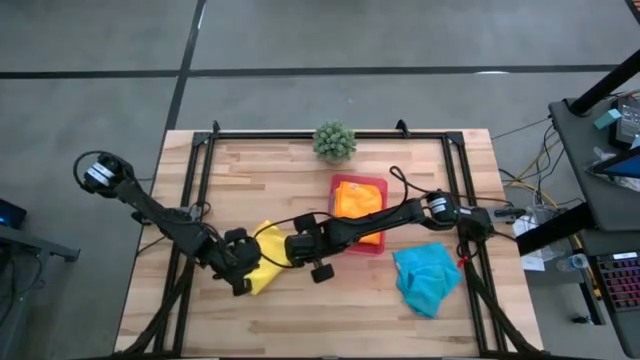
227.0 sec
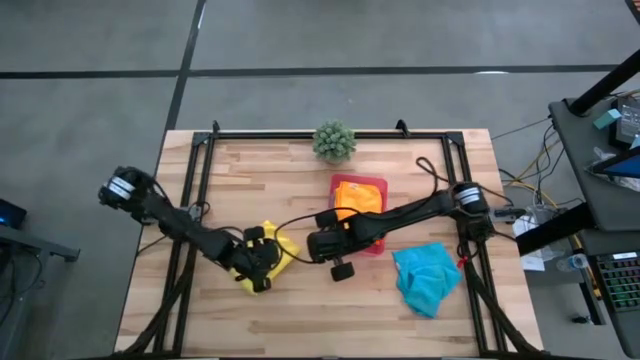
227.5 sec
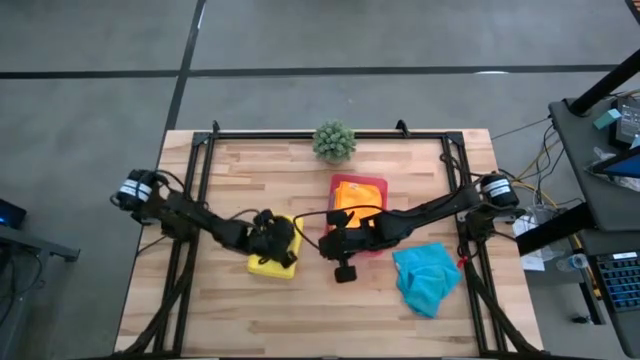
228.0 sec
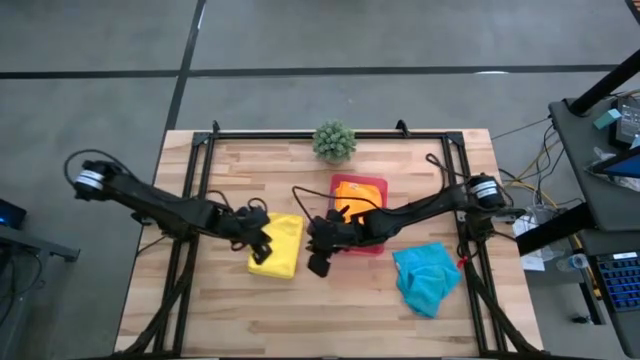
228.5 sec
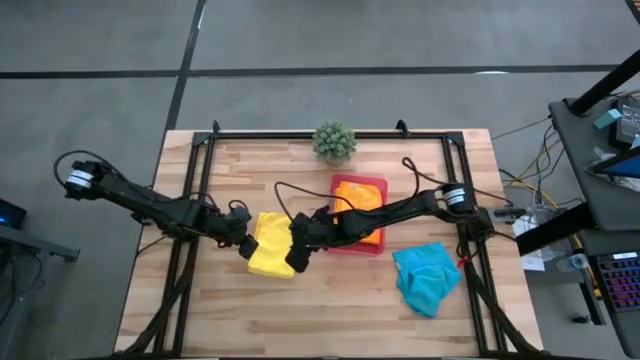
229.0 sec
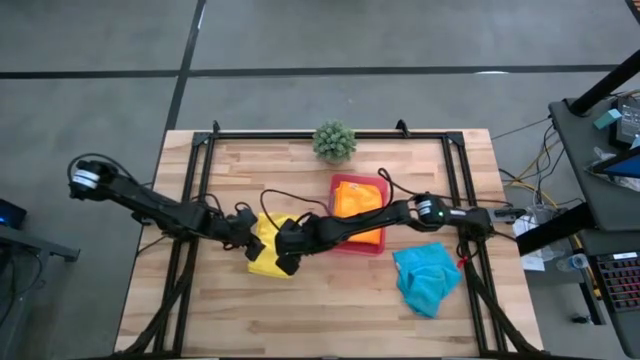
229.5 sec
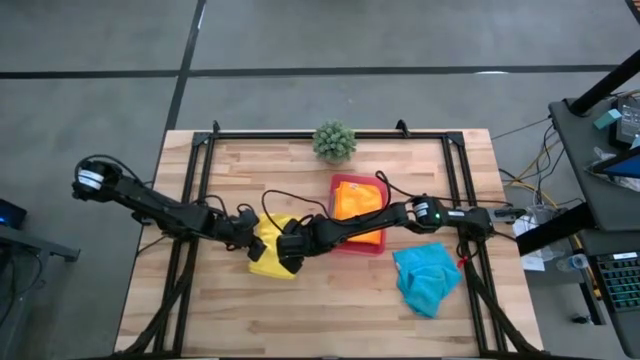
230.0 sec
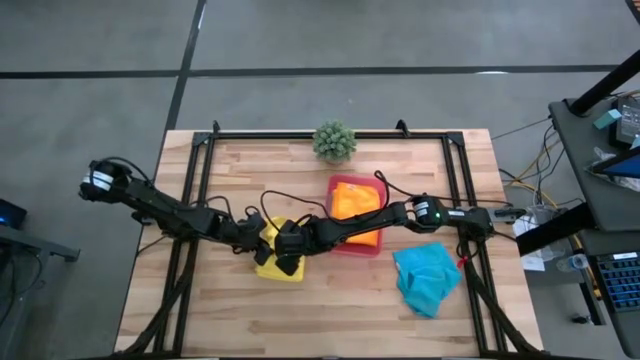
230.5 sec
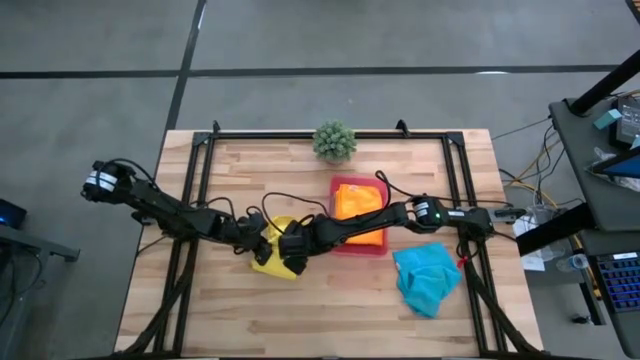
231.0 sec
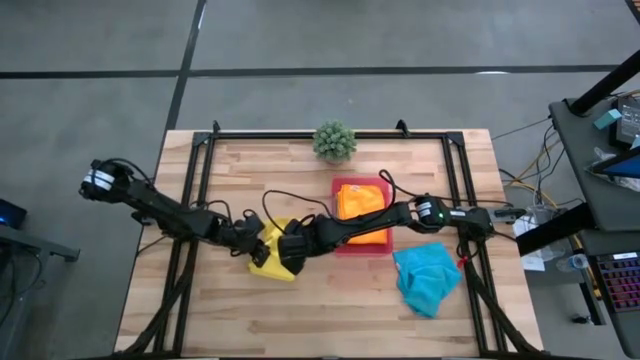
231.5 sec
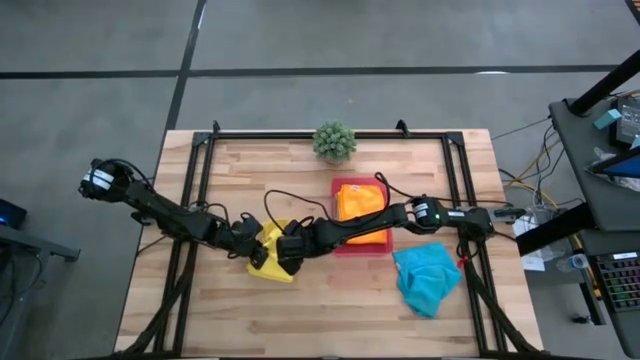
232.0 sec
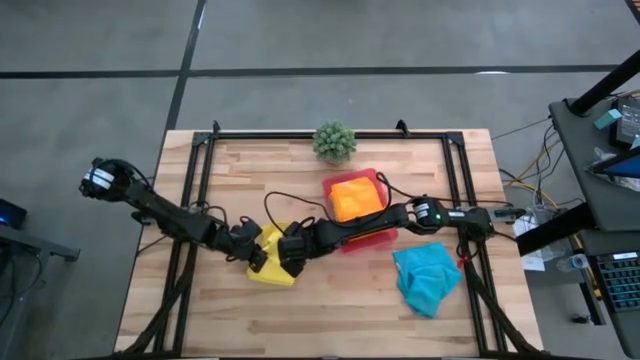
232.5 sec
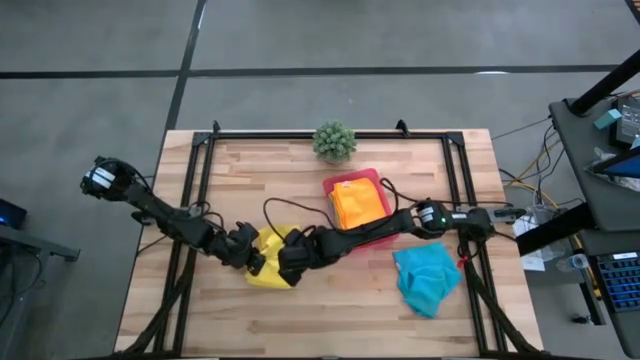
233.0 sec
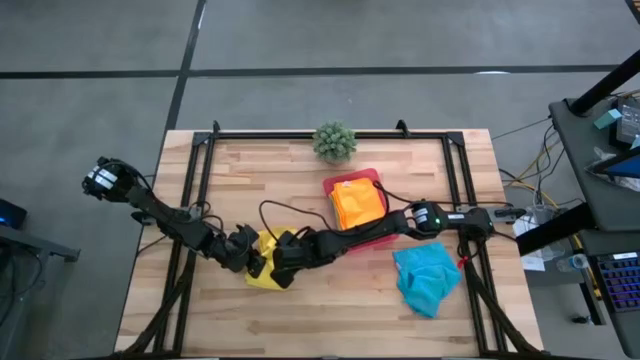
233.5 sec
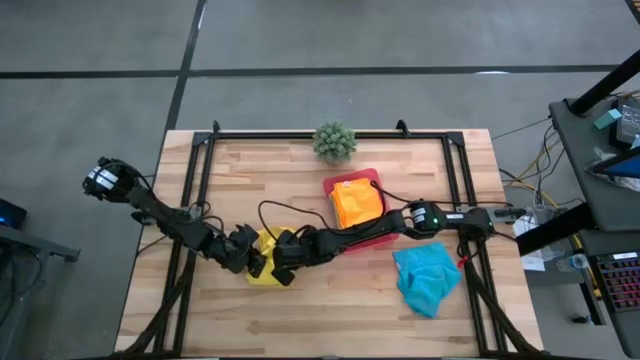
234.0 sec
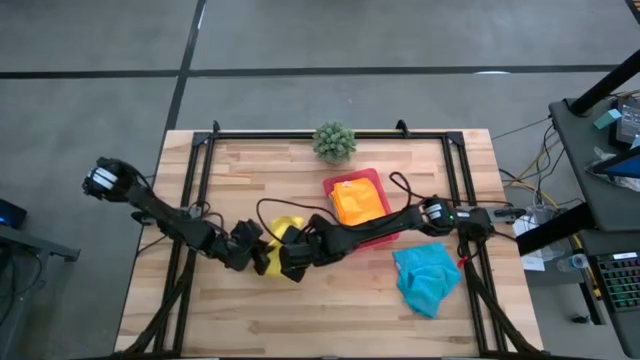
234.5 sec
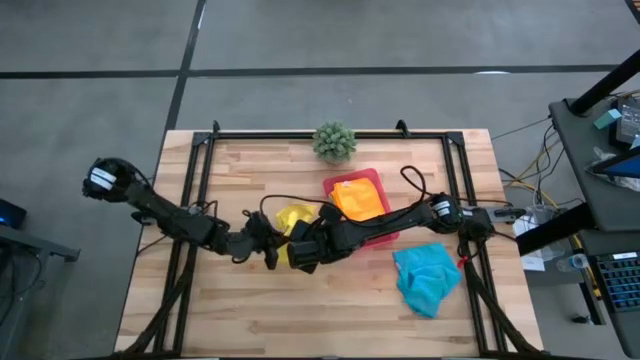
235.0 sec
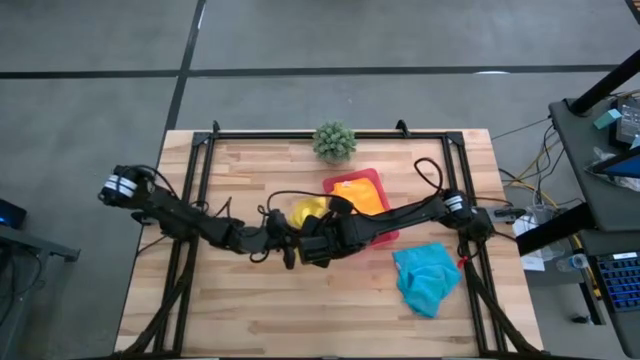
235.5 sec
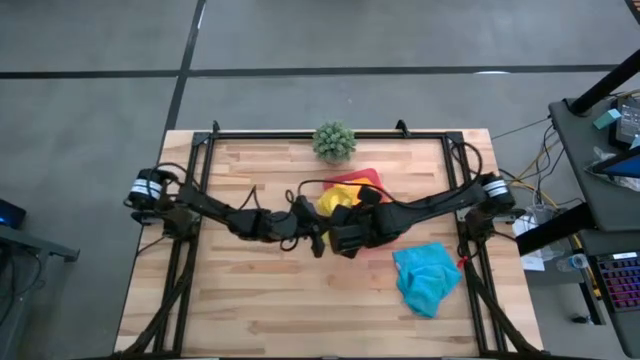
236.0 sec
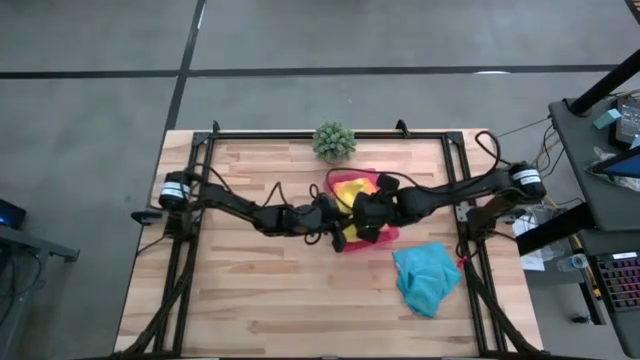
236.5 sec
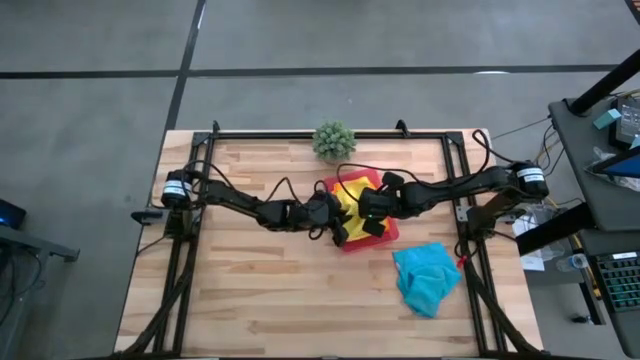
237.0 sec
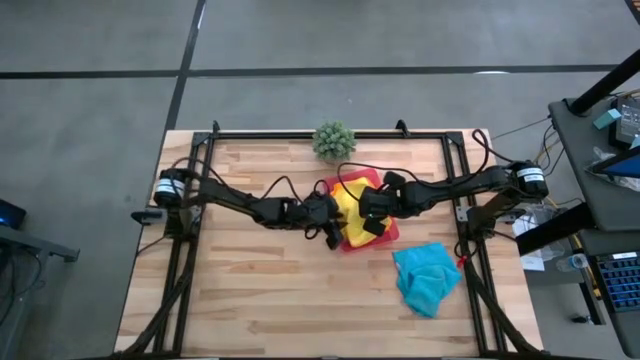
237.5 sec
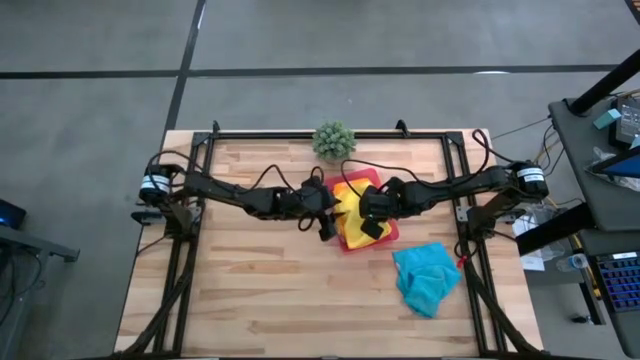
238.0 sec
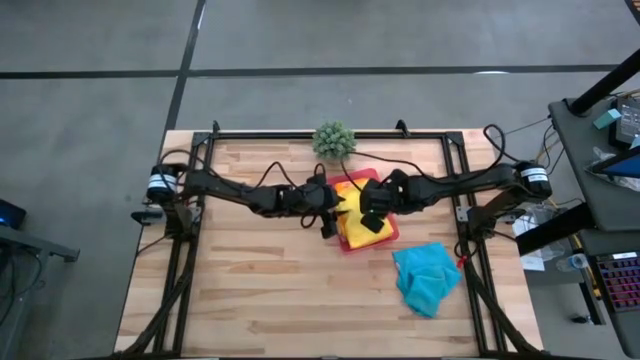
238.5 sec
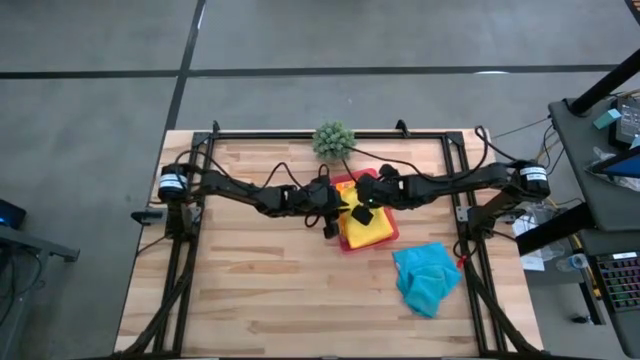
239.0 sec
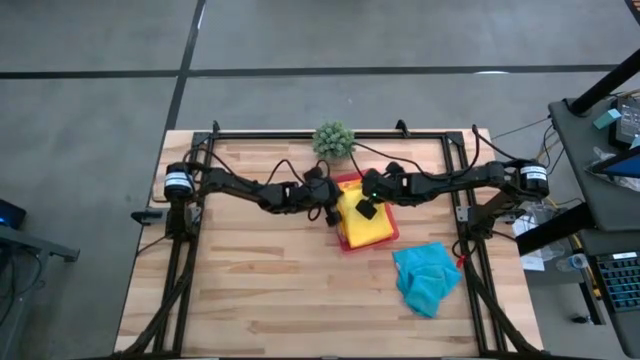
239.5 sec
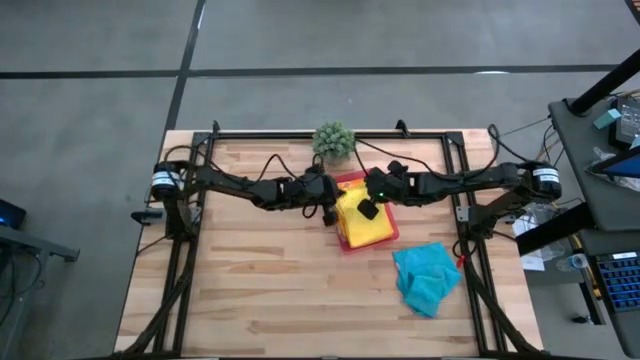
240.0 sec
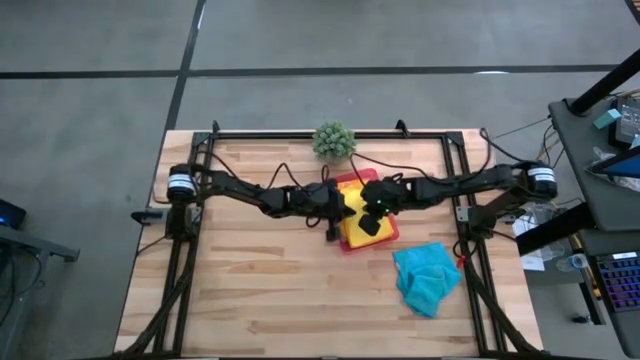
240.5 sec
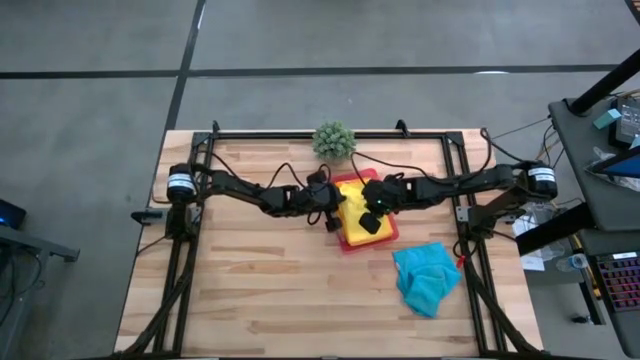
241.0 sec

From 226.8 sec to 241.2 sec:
Task: Fold microfiber towels
Put the yellow towel into the red bin

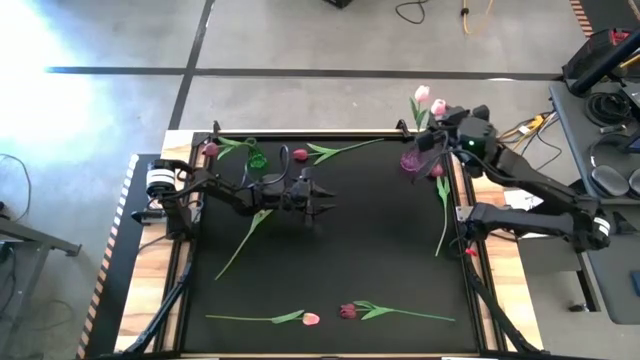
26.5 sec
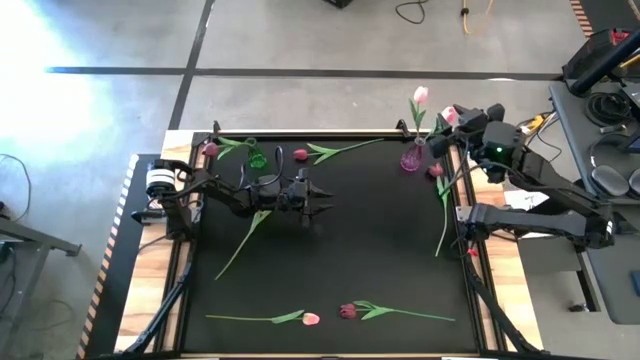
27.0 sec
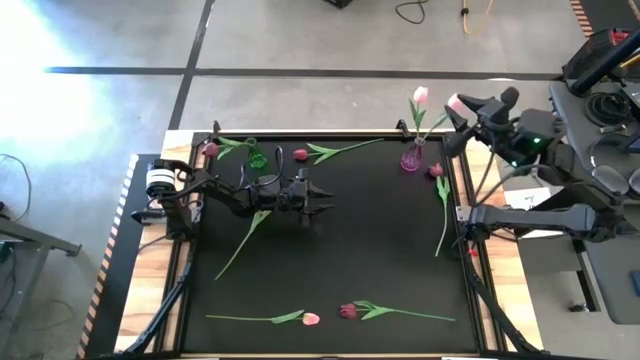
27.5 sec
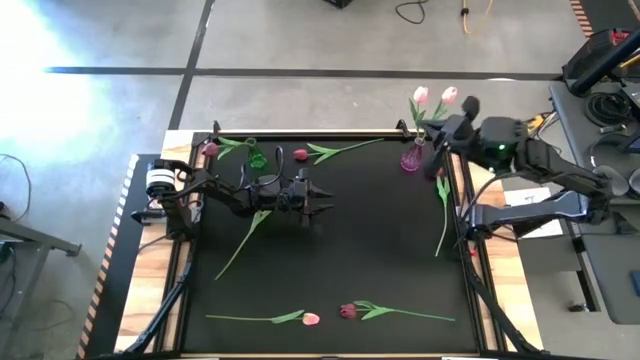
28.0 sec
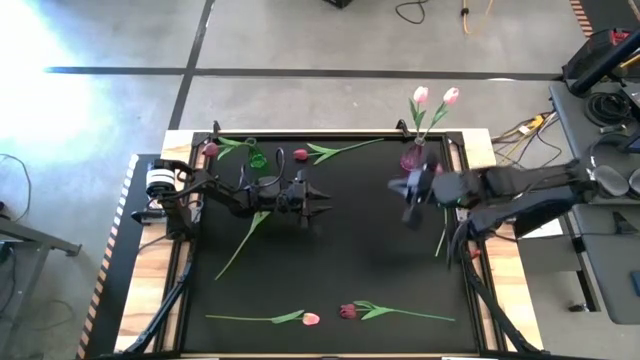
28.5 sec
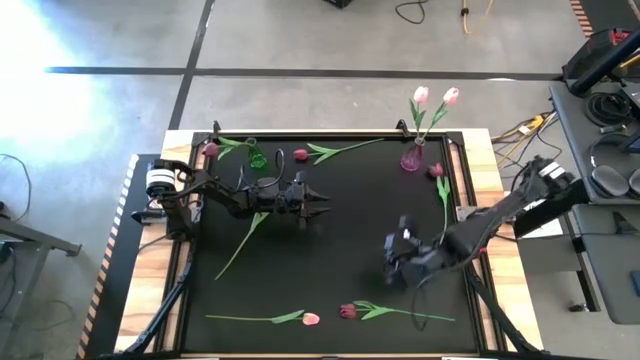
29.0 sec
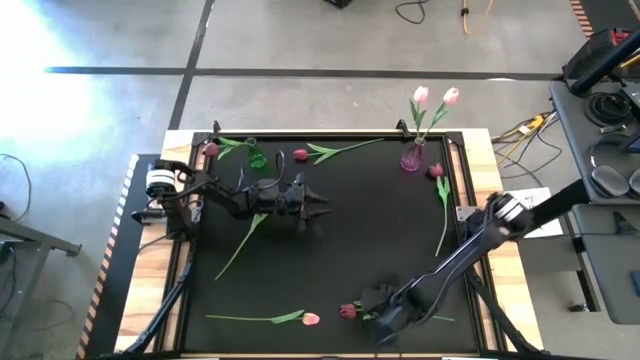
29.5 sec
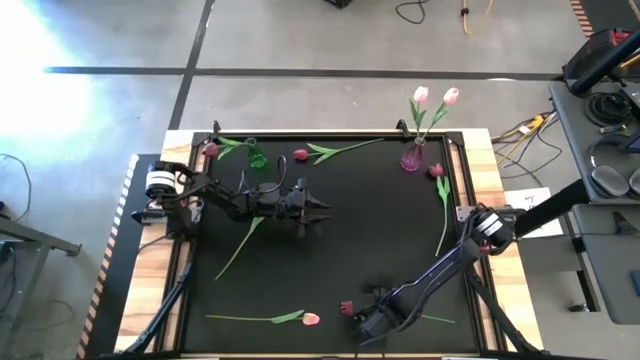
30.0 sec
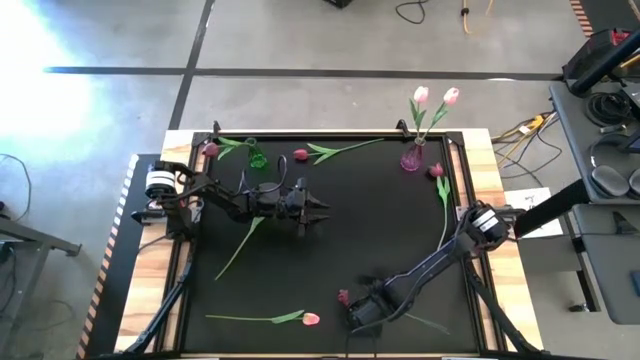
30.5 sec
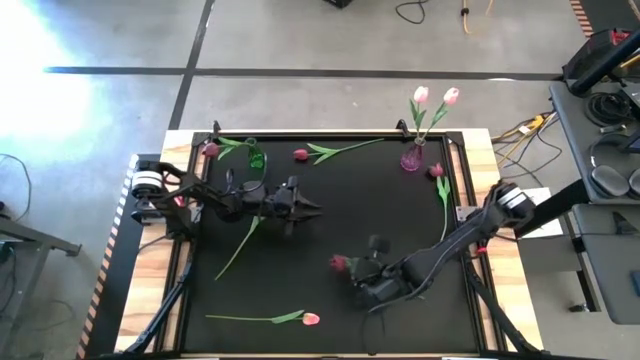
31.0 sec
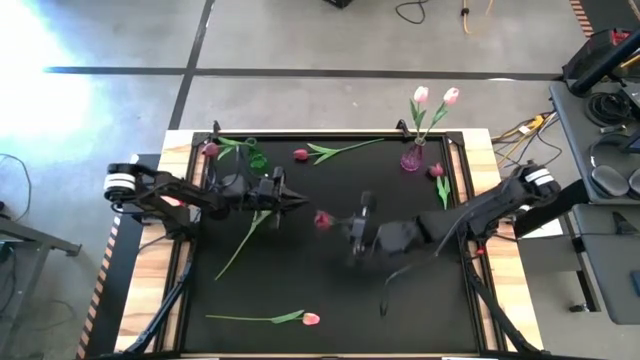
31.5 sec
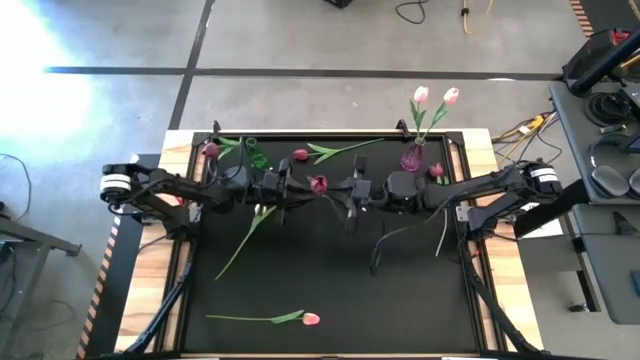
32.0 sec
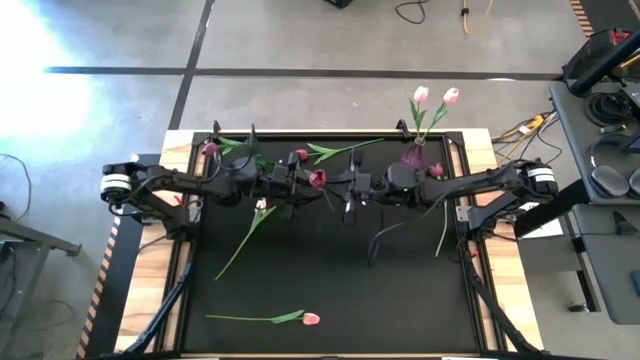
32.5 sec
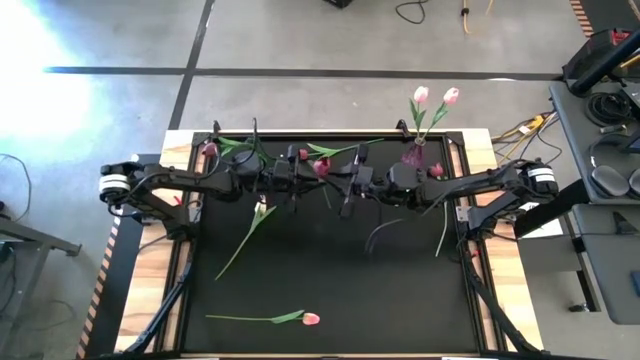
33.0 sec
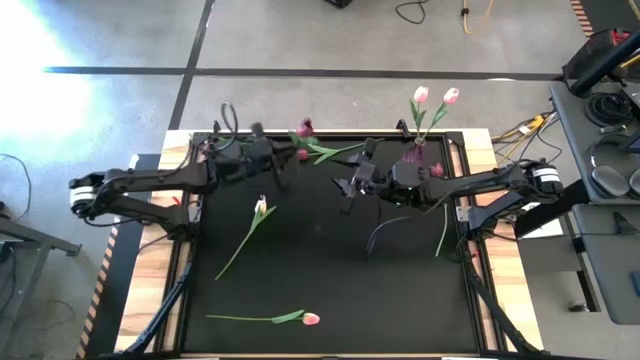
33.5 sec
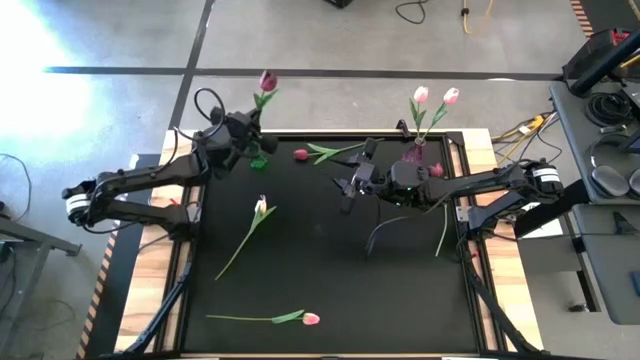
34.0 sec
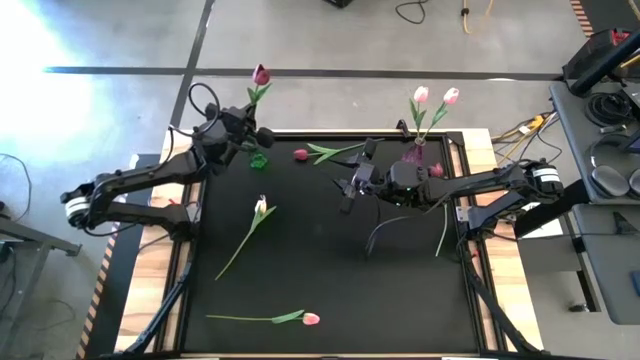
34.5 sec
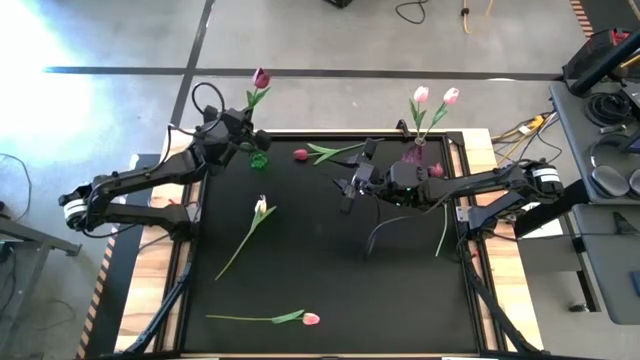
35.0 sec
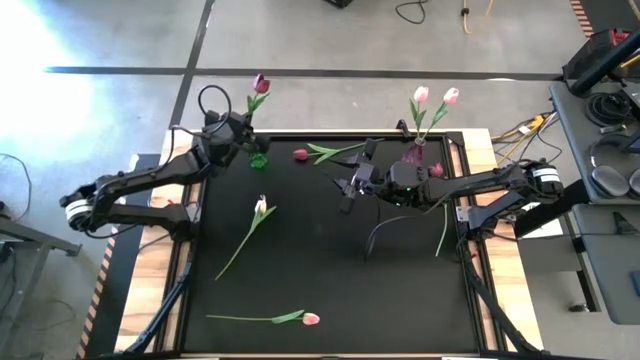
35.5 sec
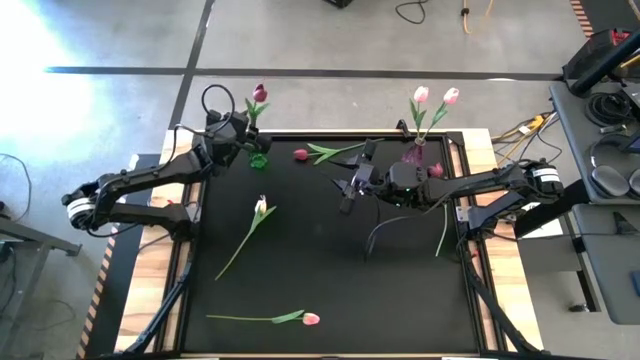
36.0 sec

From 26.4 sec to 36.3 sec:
Task: Sort flowers into vase by color
Put the red flower into the green vase
